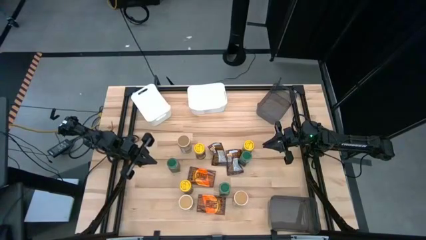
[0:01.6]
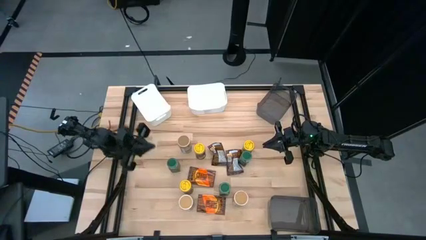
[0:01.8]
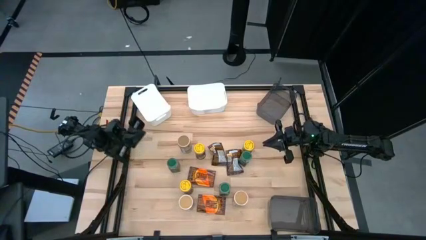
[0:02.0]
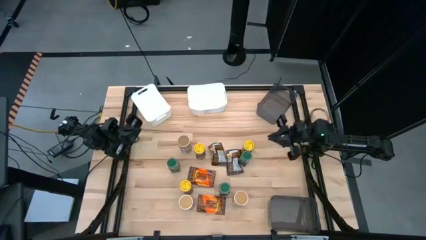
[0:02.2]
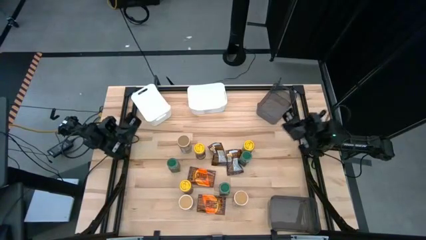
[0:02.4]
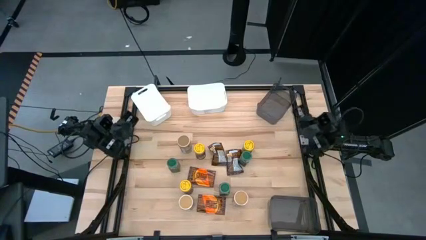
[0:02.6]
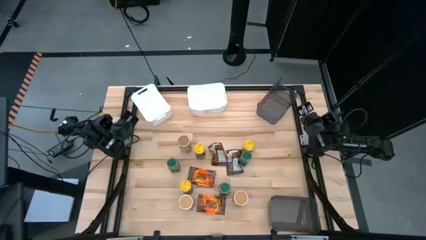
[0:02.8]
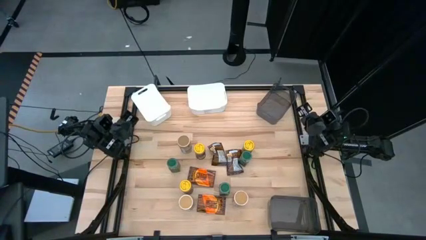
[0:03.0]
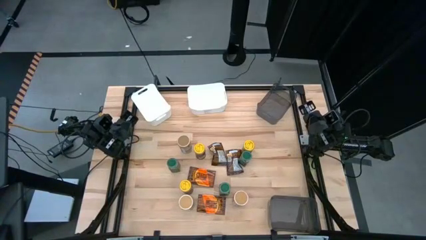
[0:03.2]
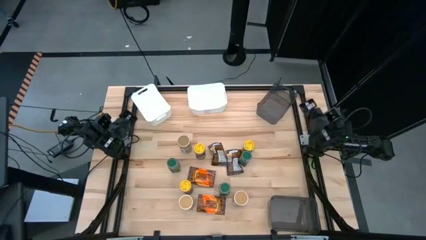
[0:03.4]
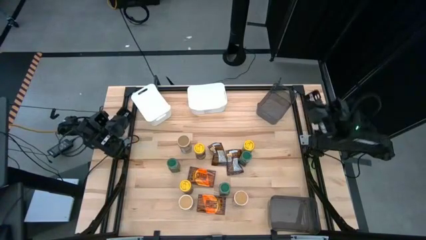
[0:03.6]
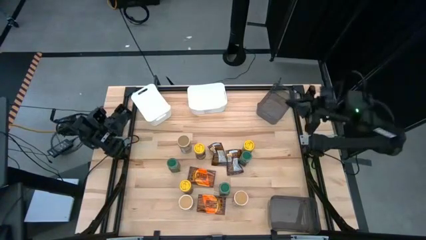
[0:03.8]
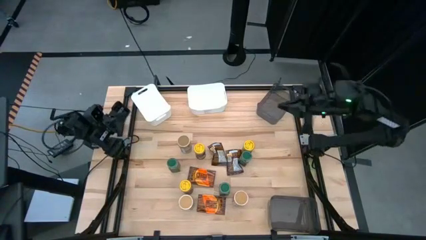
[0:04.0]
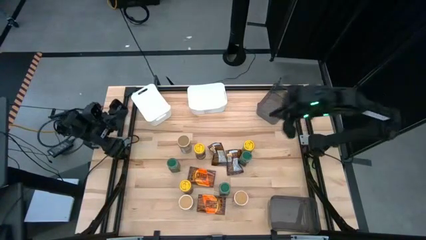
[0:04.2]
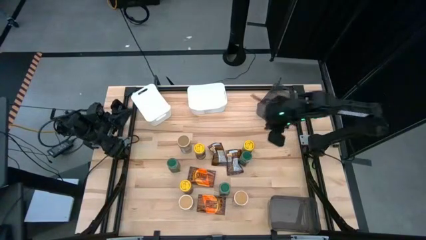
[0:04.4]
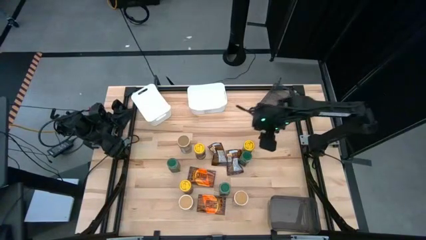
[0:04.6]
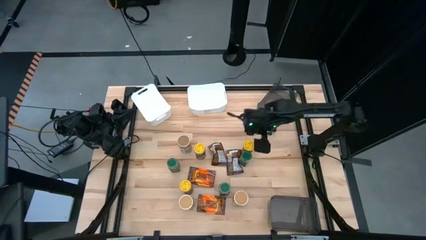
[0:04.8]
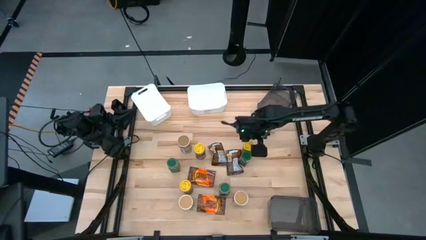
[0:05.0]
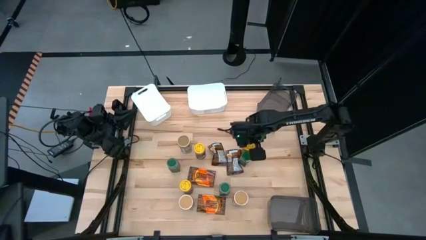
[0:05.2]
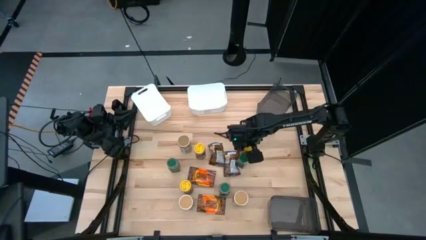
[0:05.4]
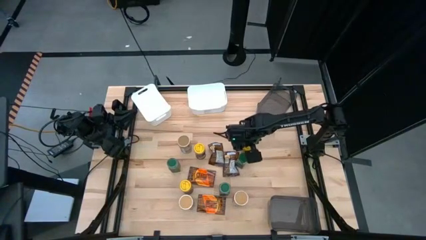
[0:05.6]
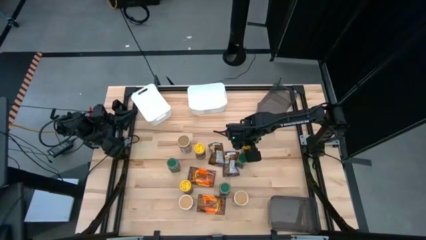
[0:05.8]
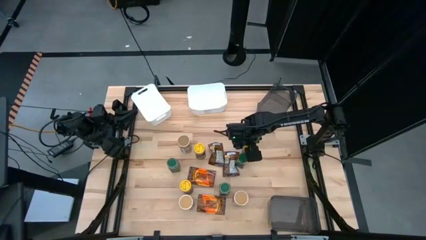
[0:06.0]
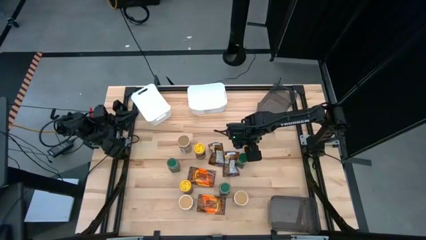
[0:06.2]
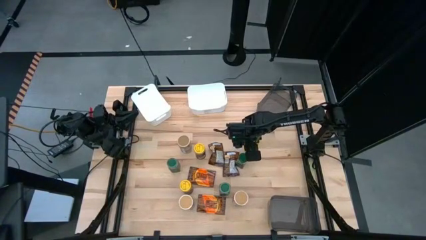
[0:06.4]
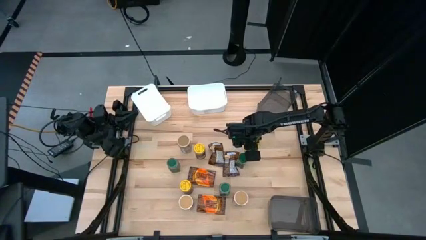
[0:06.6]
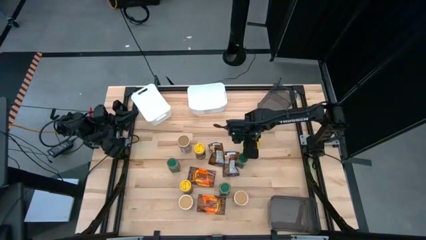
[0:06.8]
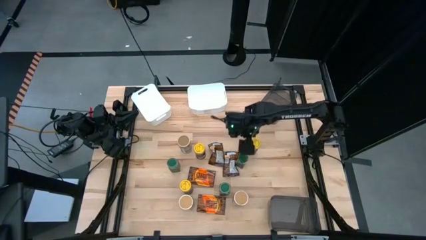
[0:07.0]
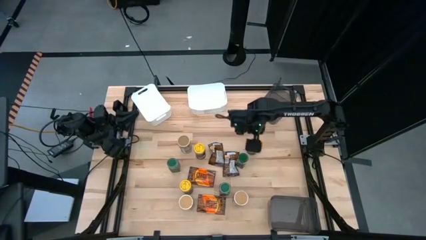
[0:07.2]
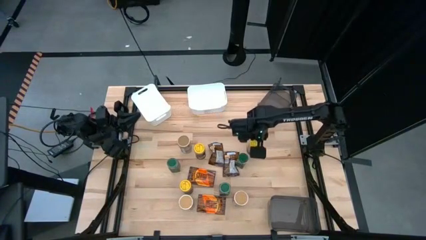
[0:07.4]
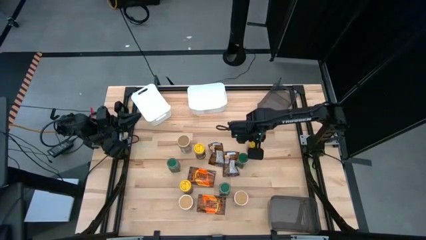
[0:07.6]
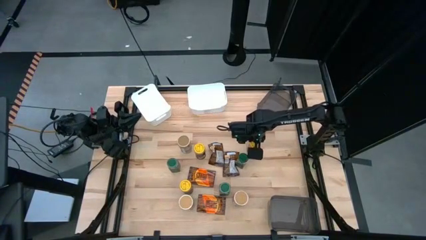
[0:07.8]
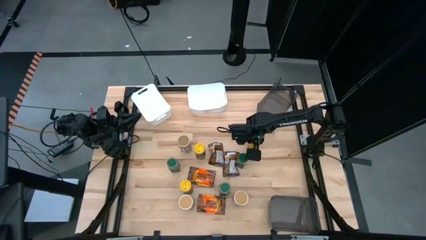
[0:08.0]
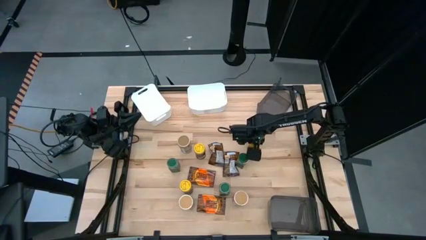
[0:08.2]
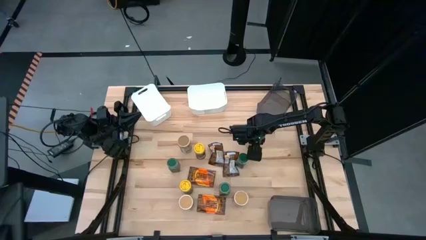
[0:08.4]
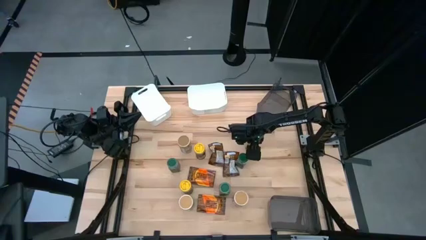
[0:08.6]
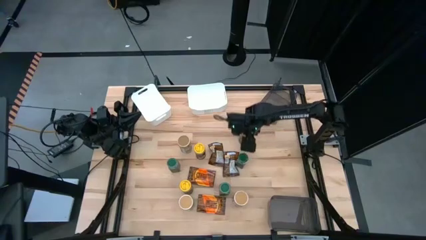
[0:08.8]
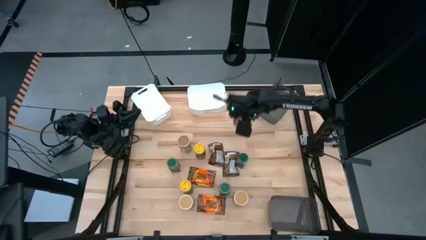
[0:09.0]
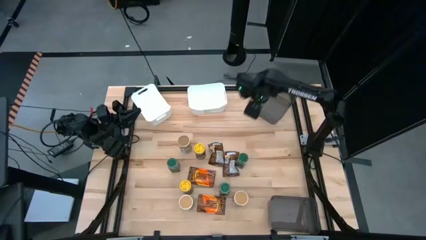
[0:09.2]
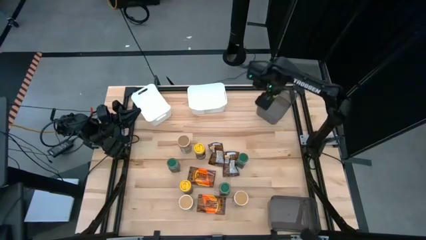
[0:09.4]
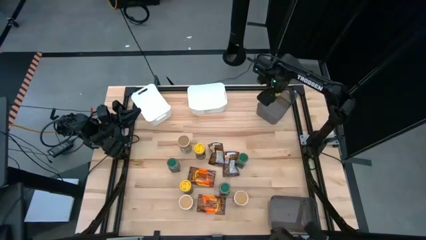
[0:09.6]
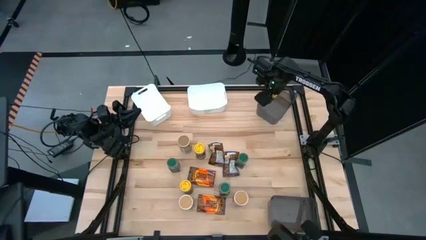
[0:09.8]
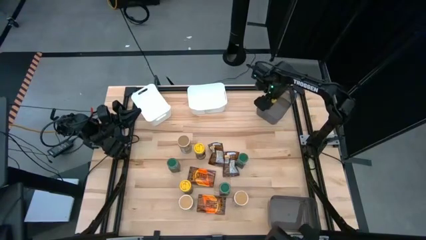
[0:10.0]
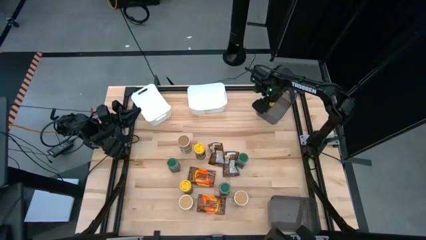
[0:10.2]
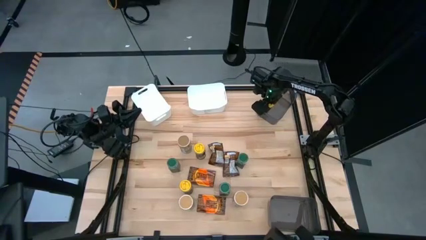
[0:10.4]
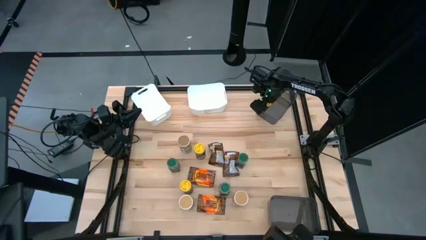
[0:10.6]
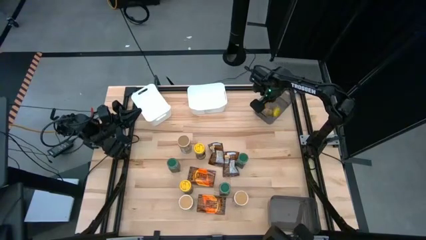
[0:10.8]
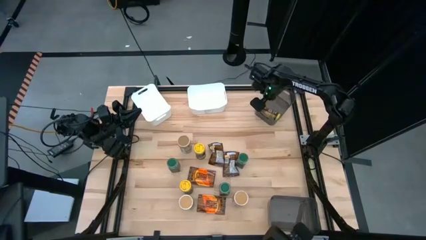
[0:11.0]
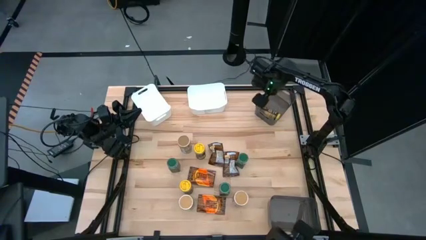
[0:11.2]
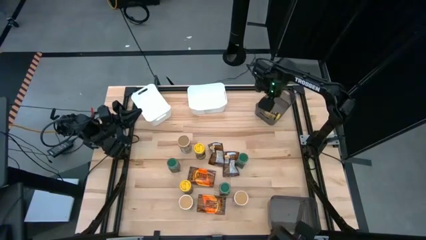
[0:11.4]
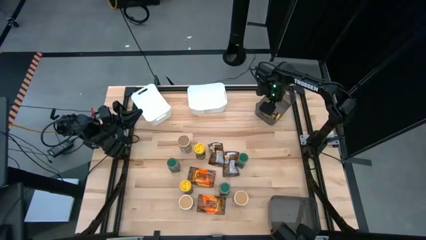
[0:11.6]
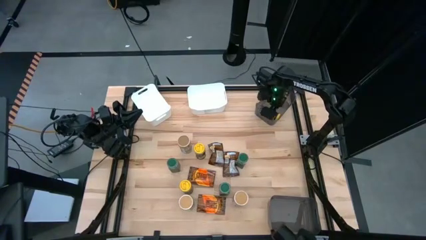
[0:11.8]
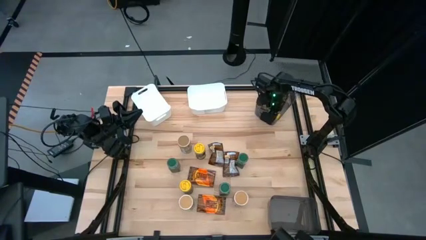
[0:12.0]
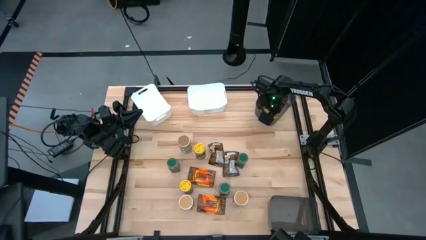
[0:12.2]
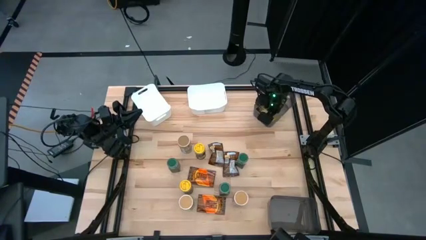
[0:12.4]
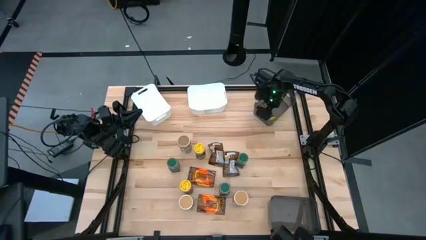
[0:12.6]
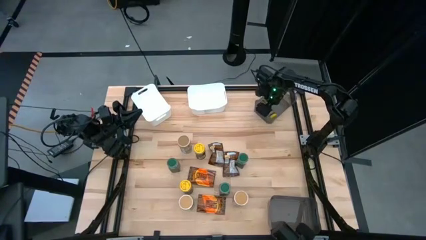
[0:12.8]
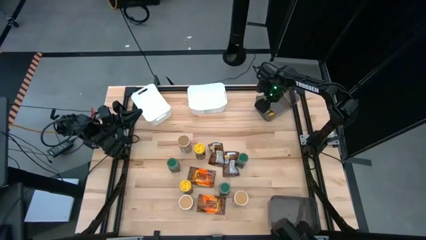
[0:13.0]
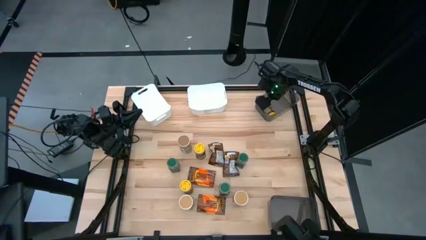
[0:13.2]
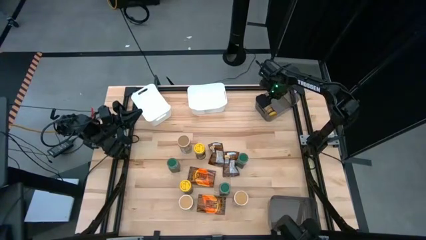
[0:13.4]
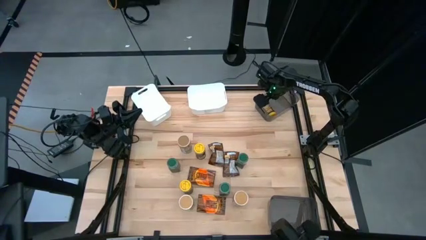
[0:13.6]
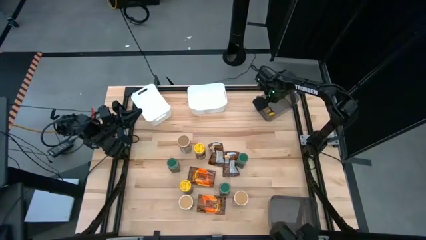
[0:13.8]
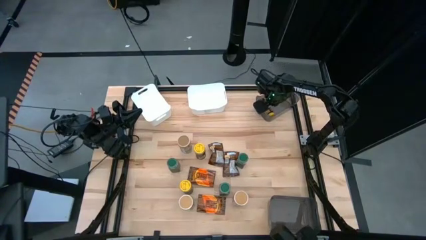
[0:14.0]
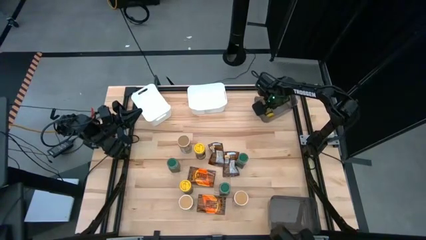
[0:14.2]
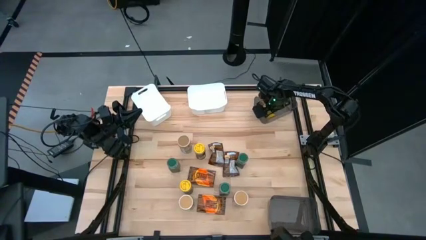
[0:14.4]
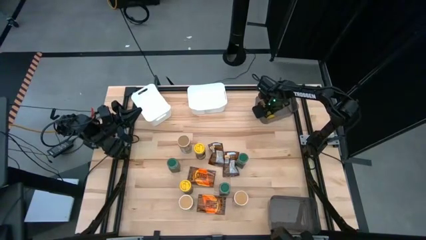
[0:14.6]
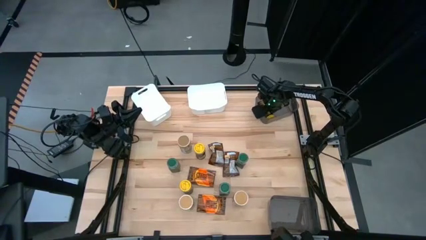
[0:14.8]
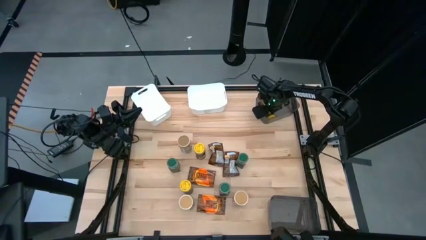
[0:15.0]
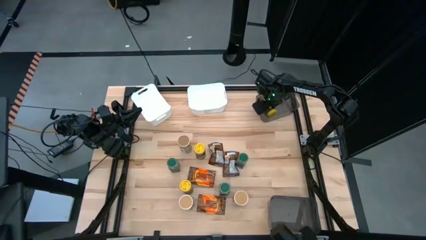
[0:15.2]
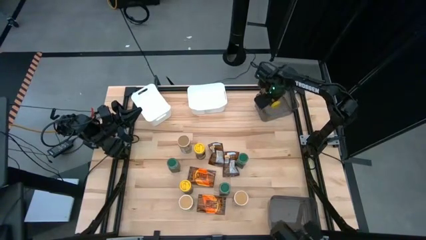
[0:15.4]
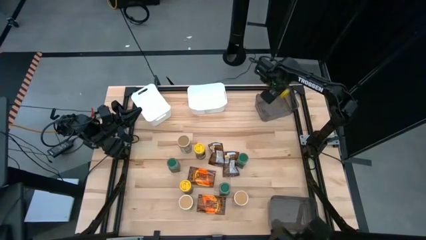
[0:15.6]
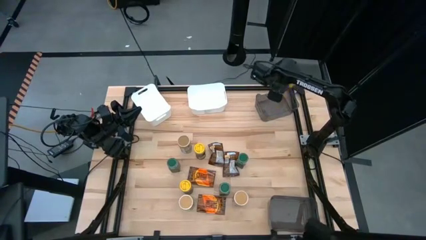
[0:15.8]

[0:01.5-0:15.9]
Task: Sort spices by type
Put the right yellow seasoning bottle into the top black bin
